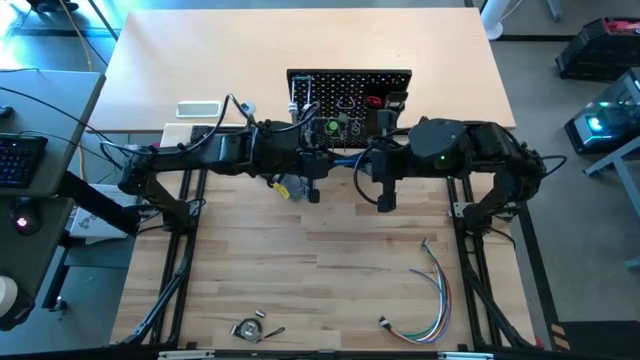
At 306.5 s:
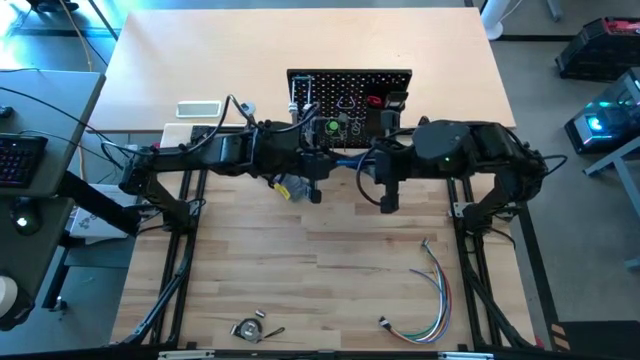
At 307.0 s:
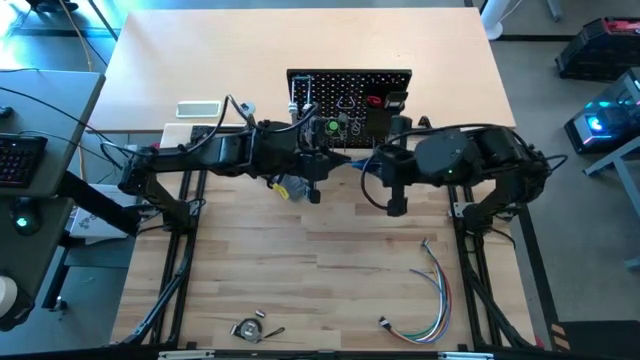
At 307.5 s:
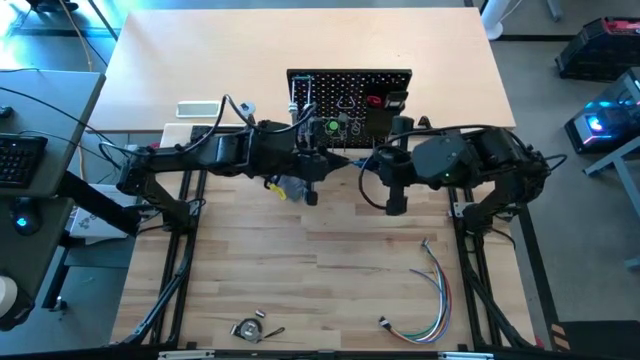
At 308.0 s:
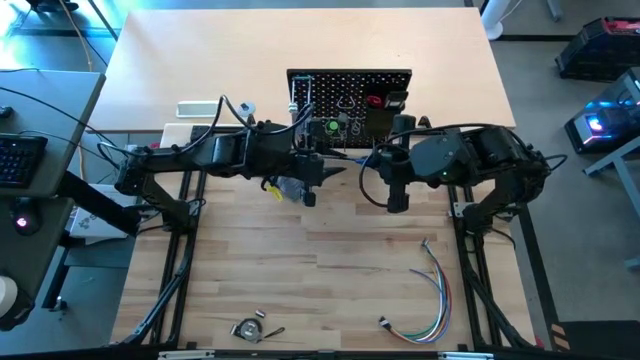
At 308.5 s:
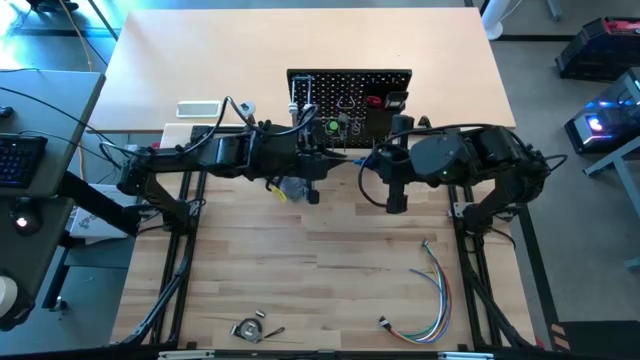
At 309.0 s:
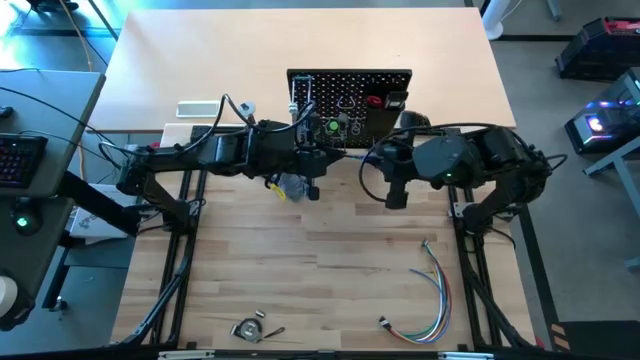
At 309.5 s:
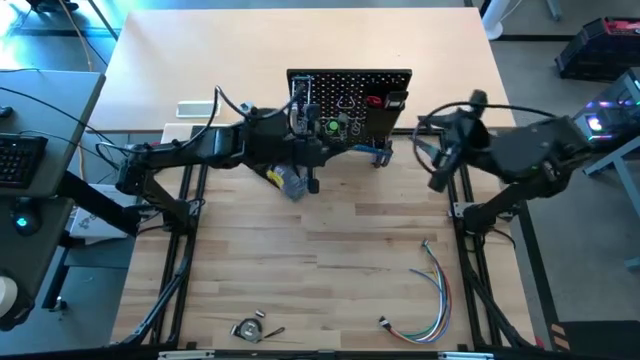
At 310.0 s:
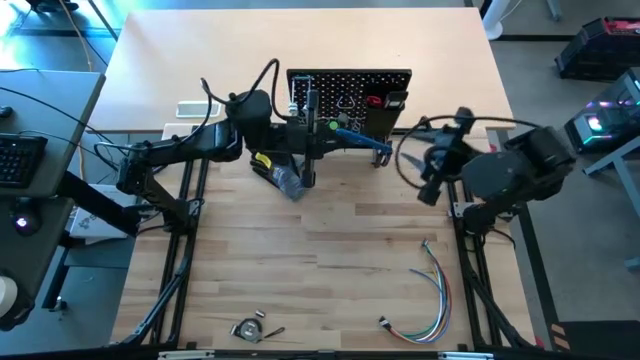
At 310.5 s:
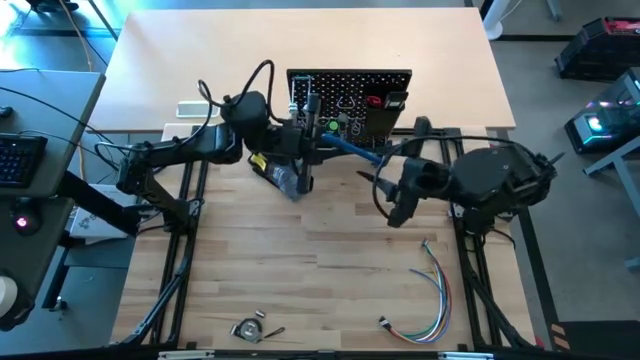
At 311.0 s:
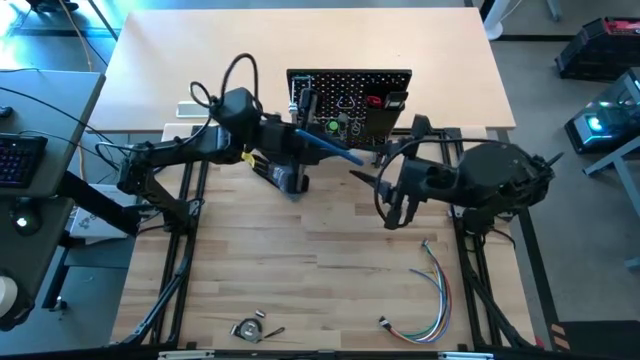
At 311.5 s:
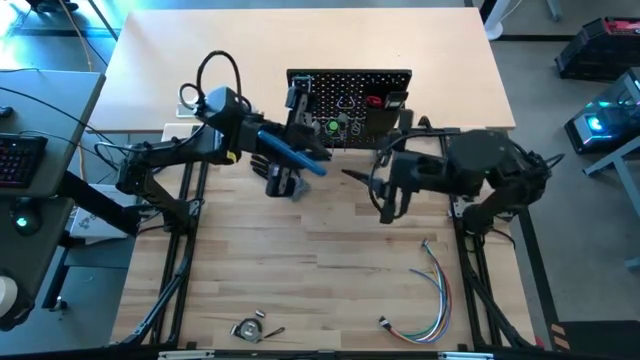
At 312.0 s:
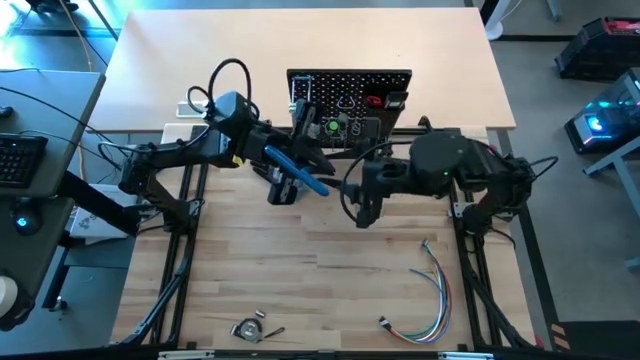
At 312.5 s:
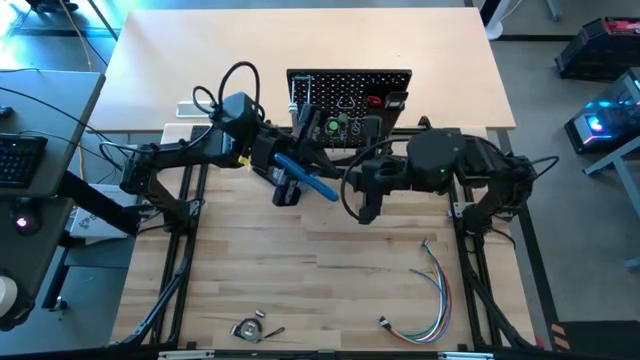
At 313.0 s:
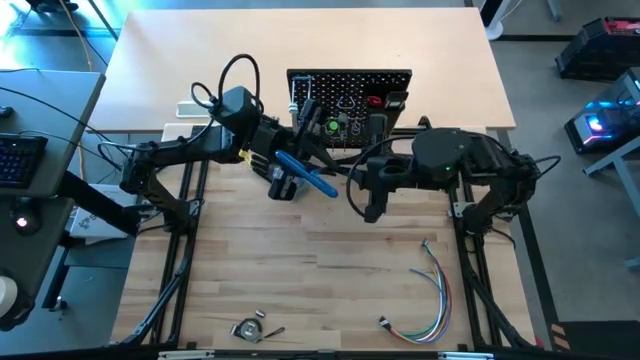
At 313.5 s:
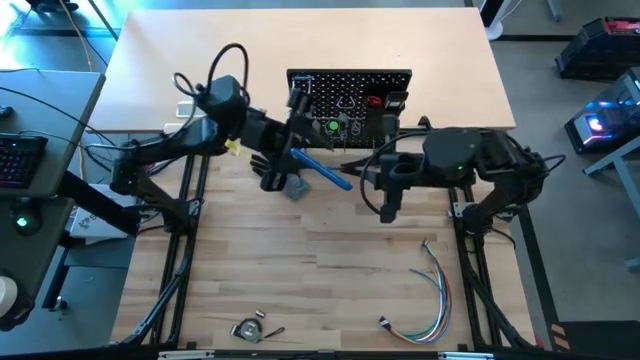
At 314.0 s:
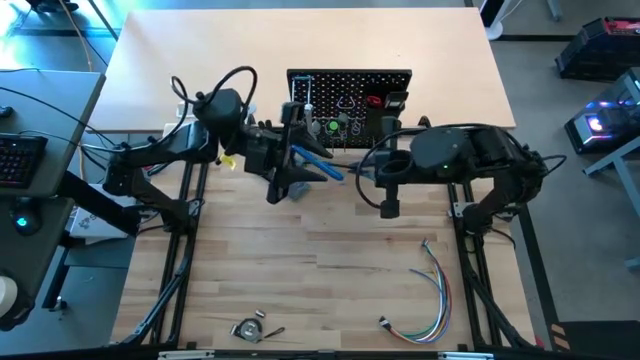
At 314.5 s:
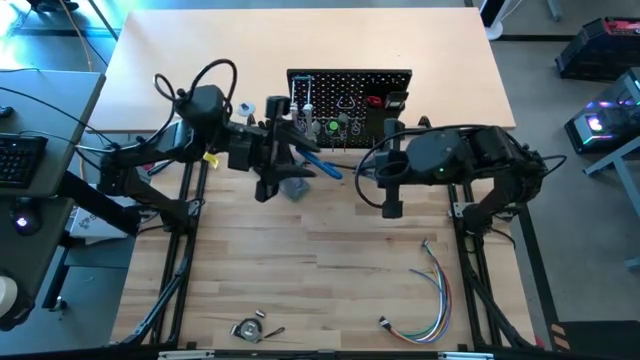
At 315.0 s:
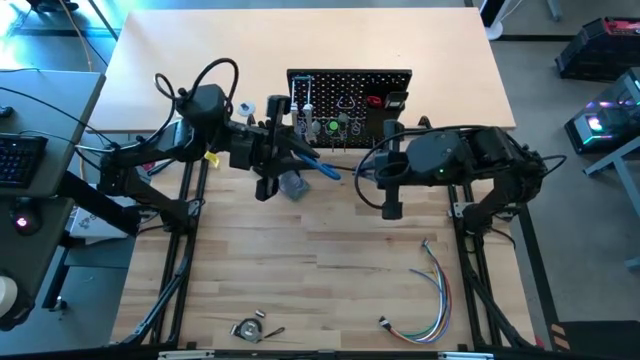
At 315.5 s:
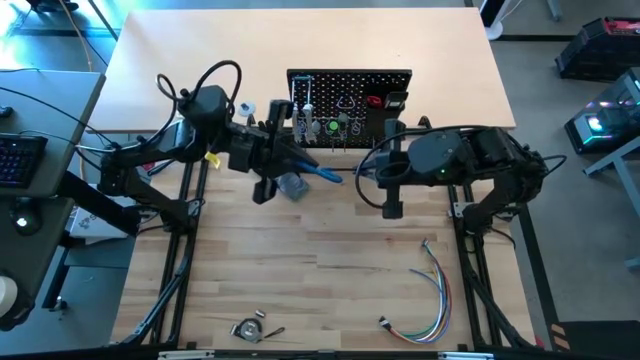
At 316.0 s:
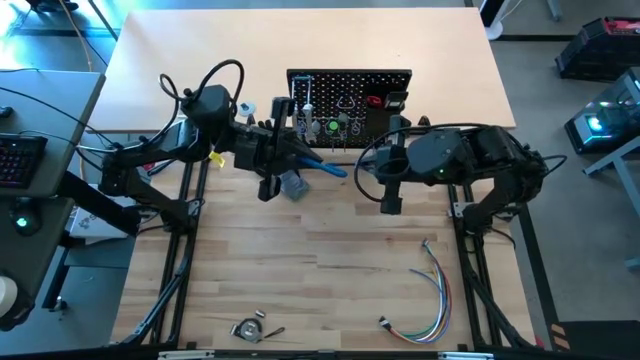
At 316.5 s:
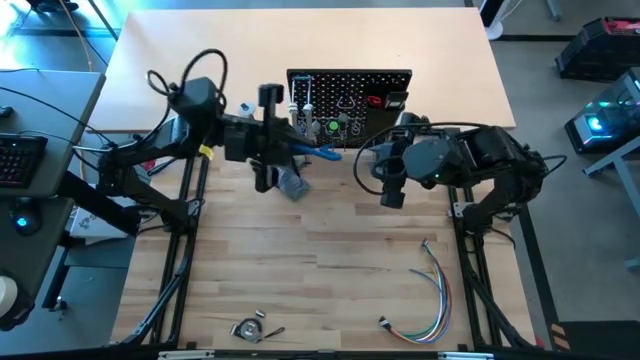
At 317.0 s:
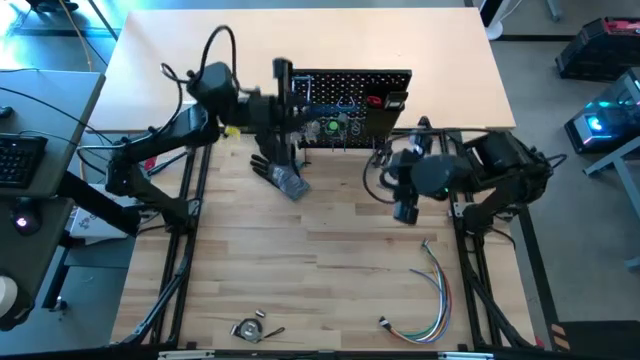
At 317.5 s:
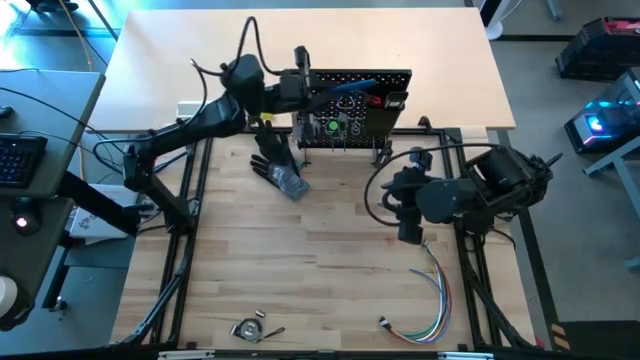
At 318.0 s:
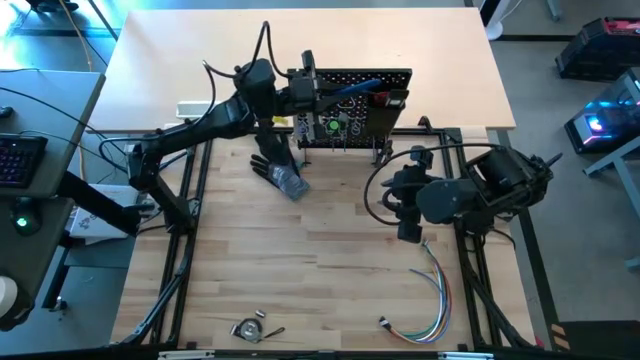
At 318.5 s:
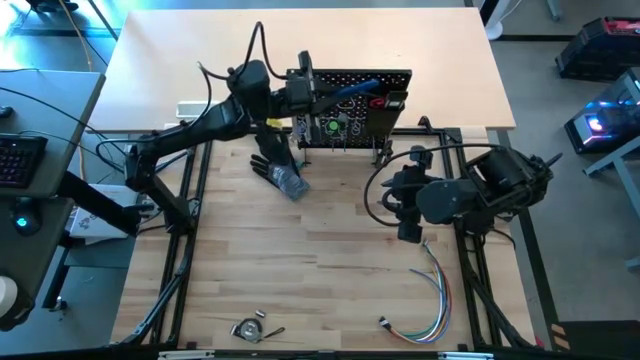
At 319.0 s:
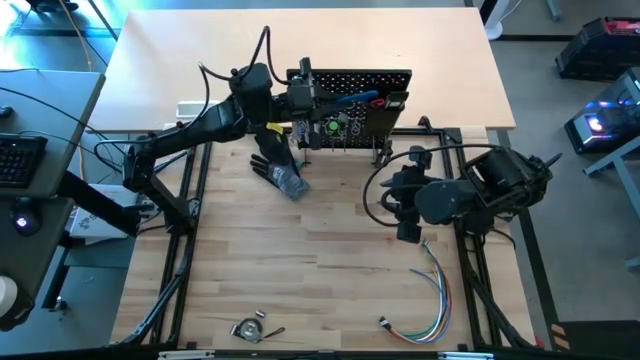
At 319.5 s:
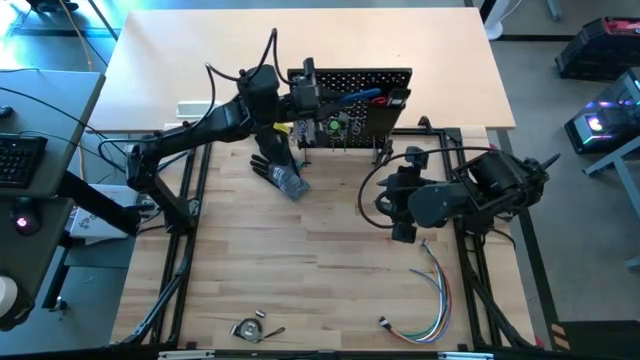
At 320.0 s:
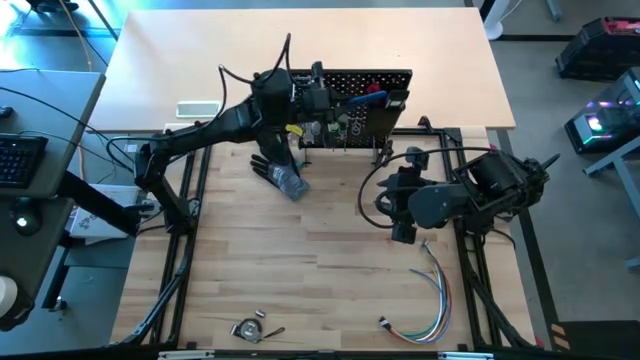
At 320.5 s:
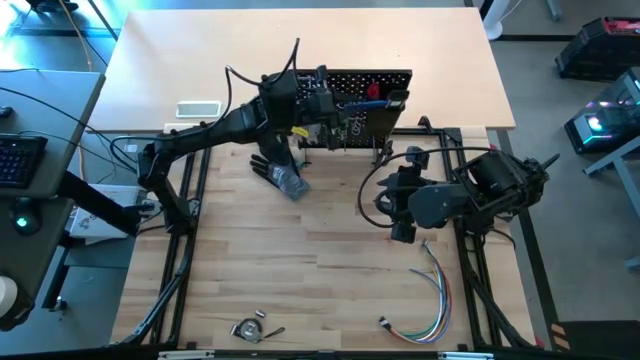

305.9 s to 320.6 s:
Task: Hang tools onto peg board
Hang the blue pick tool on the pegboard

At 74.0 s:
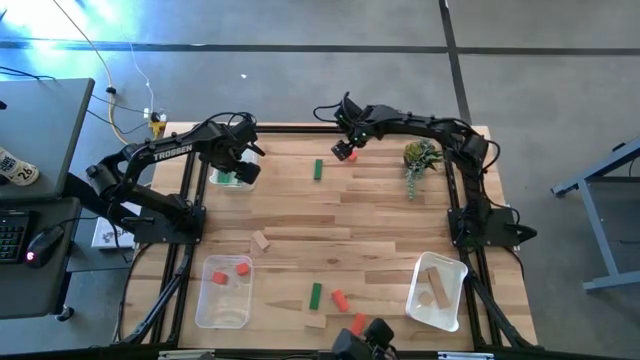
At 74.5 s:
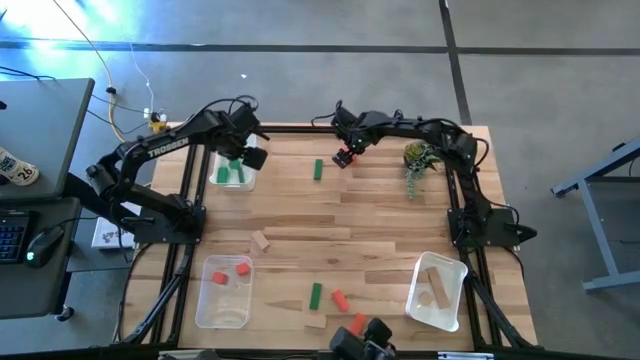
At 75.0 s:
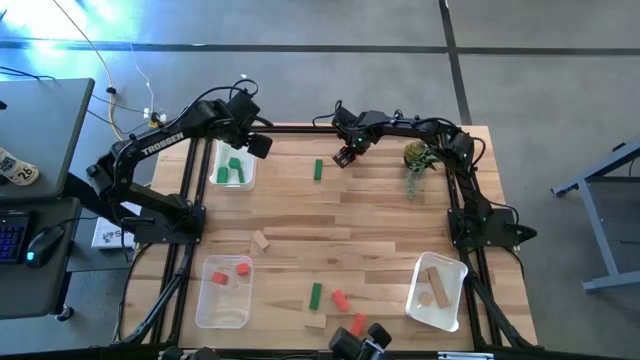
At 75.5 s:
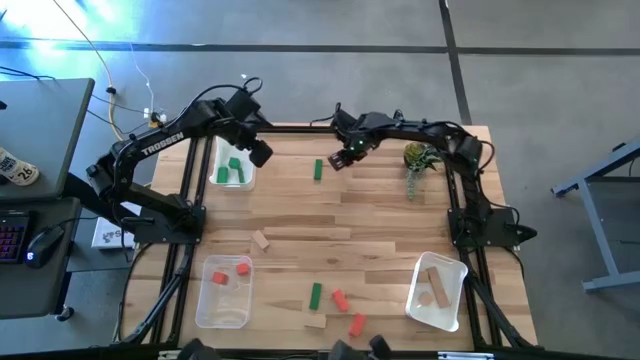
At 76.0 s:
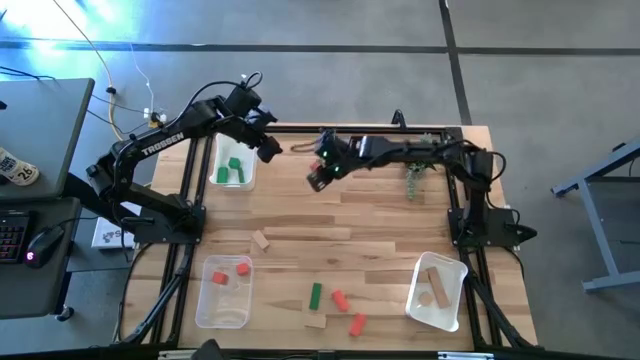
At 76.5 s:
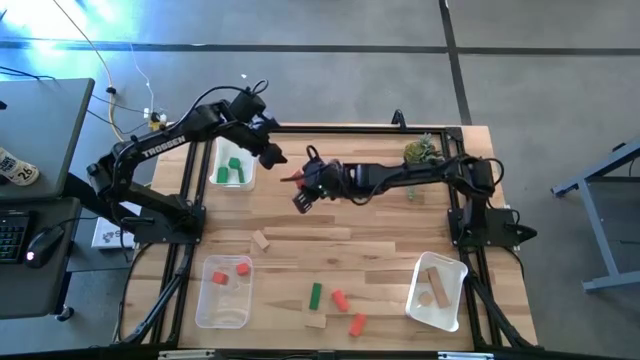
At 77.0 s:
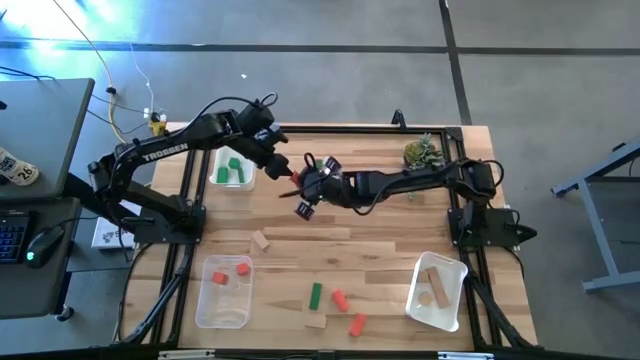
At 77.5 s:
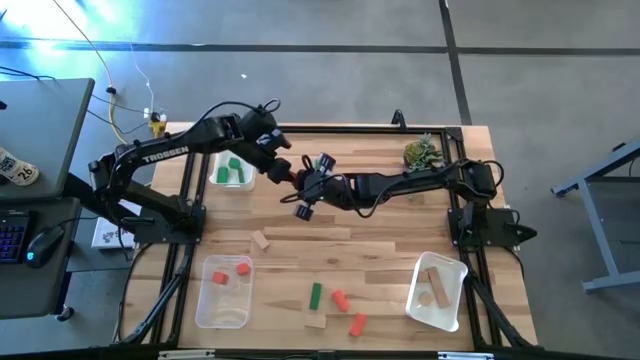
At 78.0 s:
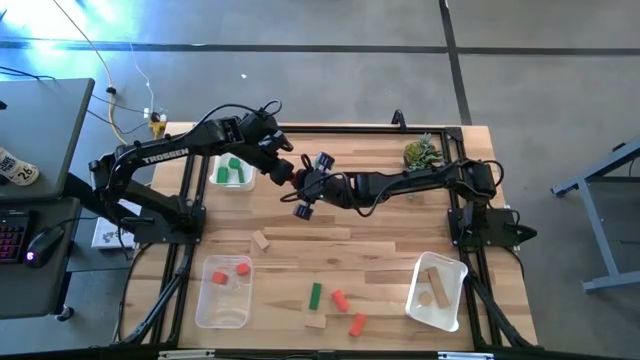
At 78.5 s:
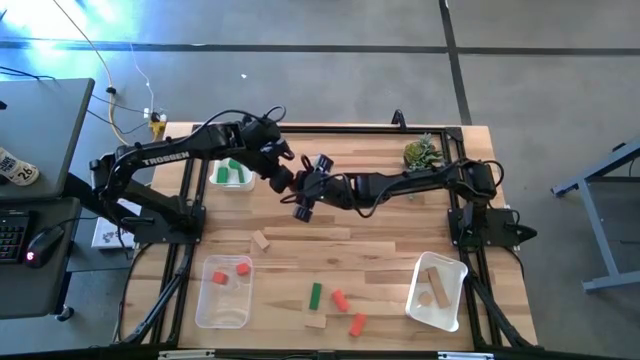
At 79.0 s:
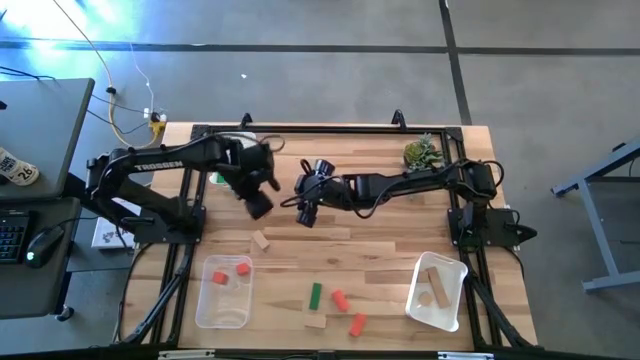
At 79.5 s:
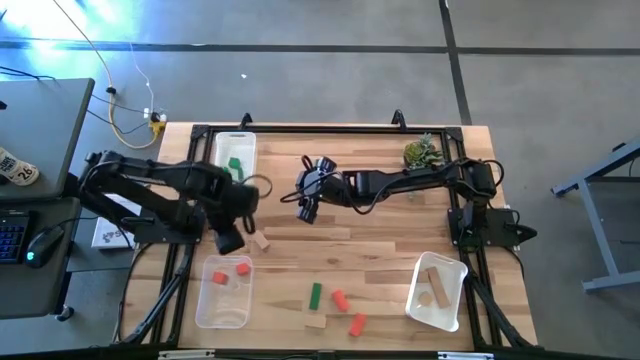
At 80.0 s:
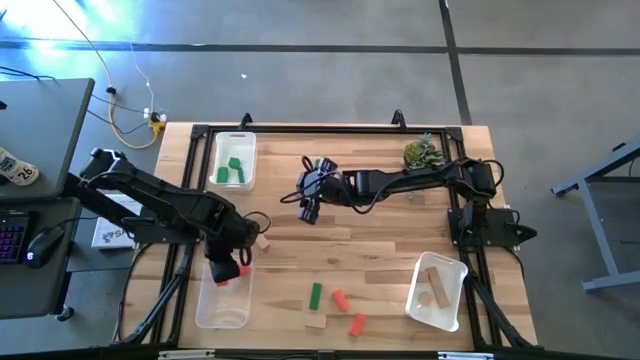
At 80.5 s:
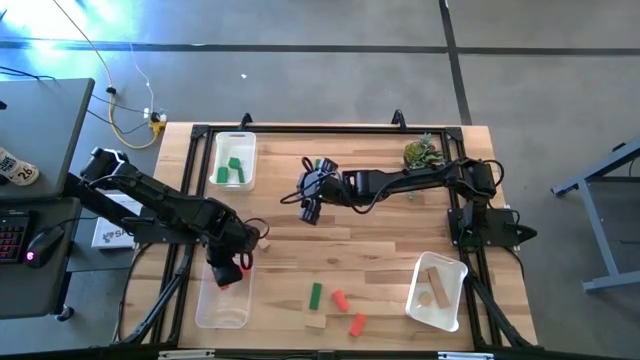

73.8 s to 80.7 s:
Task: Sort & place blocks by color
Put the orange block into the transparent bin
